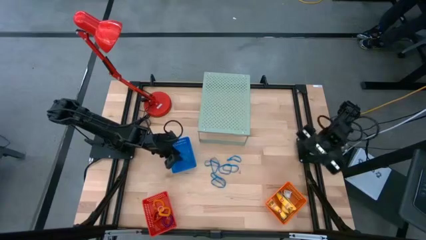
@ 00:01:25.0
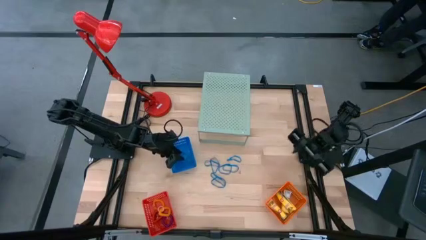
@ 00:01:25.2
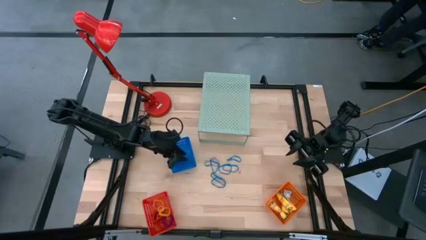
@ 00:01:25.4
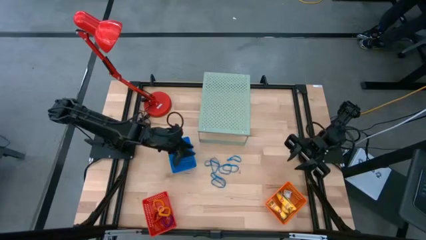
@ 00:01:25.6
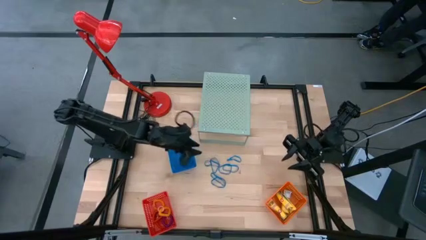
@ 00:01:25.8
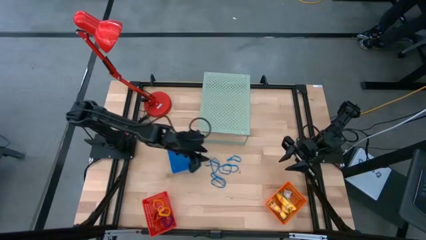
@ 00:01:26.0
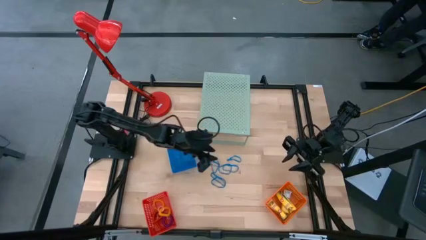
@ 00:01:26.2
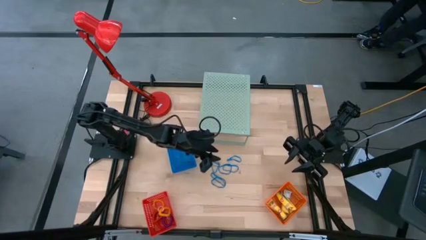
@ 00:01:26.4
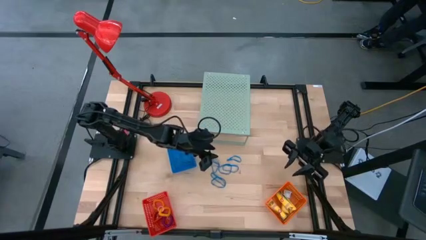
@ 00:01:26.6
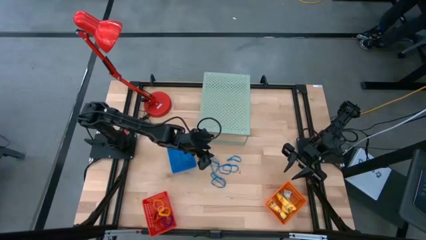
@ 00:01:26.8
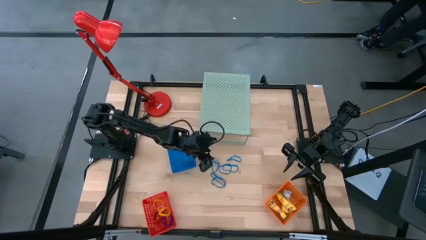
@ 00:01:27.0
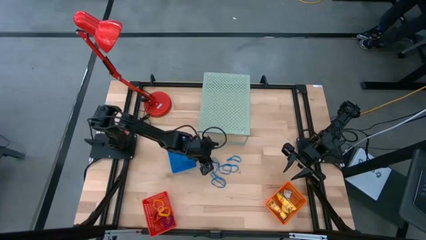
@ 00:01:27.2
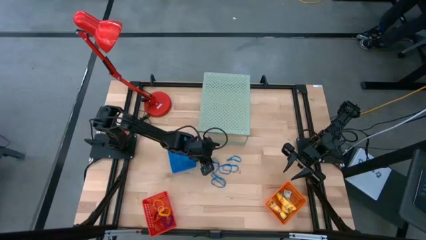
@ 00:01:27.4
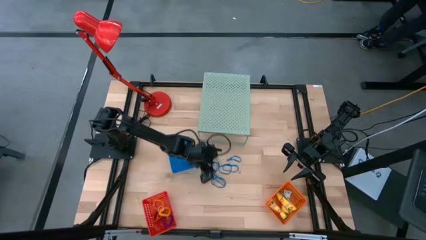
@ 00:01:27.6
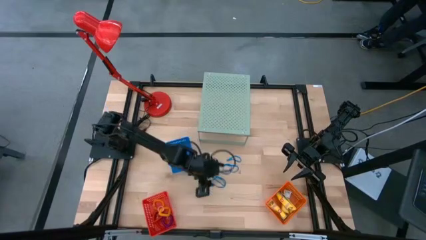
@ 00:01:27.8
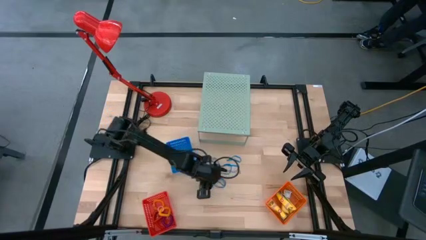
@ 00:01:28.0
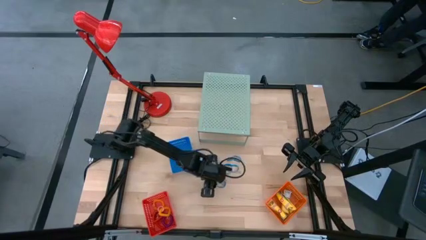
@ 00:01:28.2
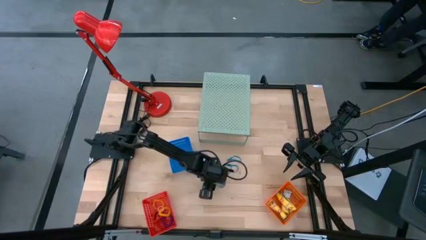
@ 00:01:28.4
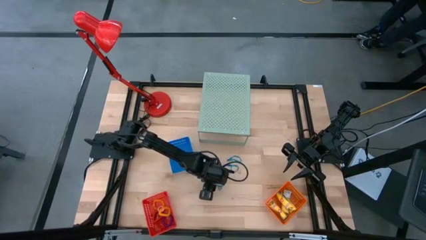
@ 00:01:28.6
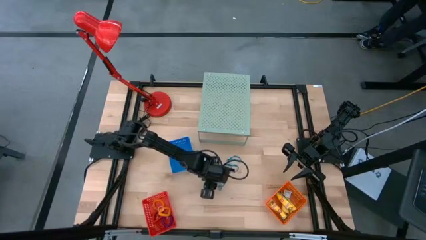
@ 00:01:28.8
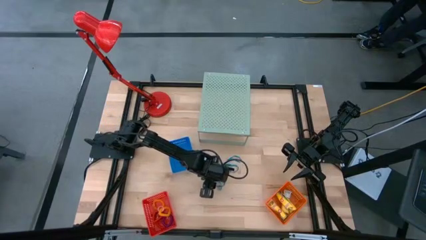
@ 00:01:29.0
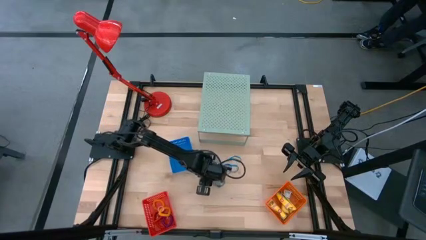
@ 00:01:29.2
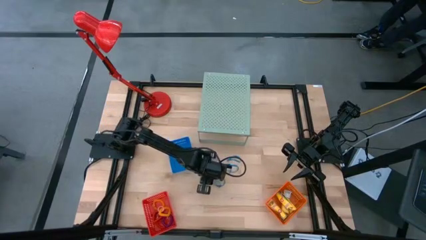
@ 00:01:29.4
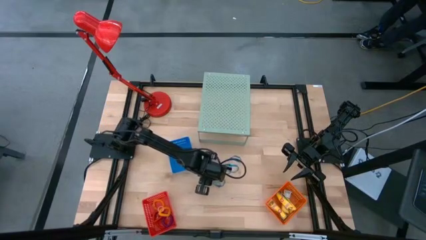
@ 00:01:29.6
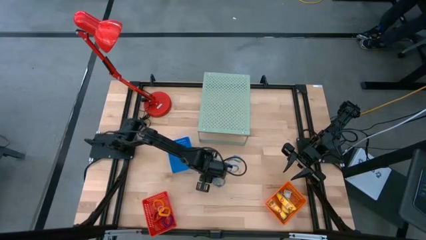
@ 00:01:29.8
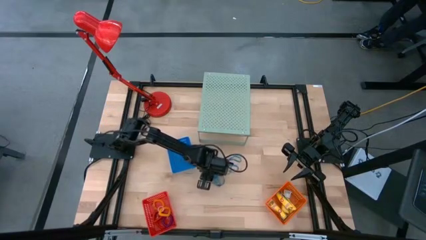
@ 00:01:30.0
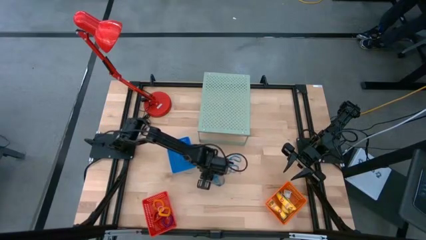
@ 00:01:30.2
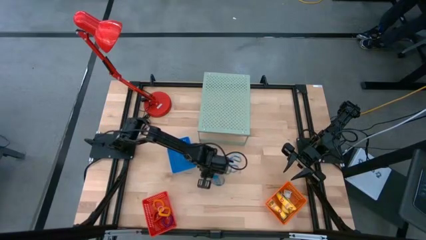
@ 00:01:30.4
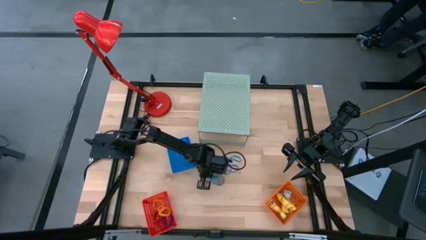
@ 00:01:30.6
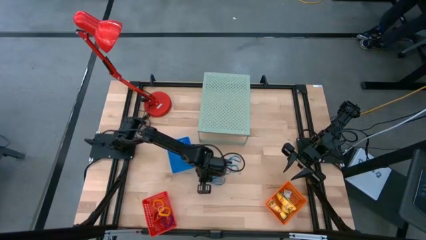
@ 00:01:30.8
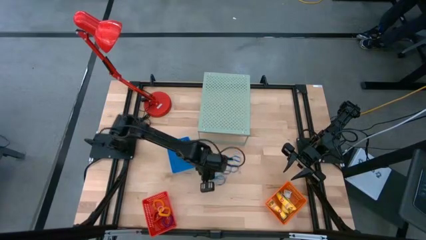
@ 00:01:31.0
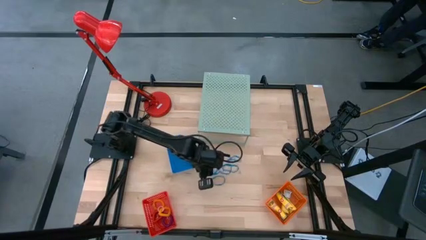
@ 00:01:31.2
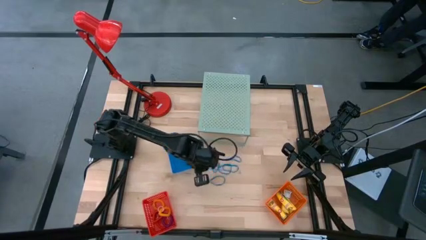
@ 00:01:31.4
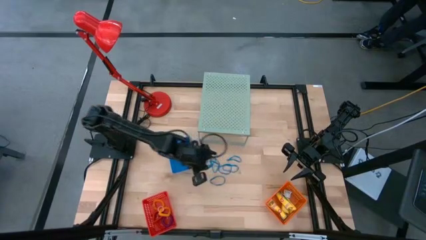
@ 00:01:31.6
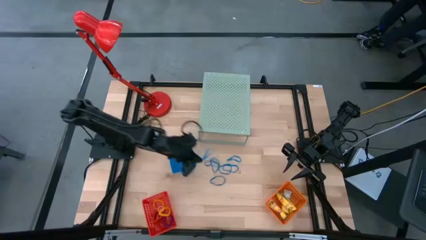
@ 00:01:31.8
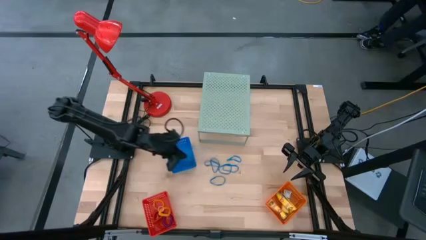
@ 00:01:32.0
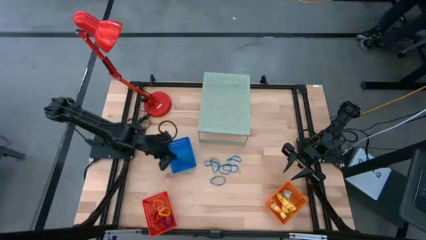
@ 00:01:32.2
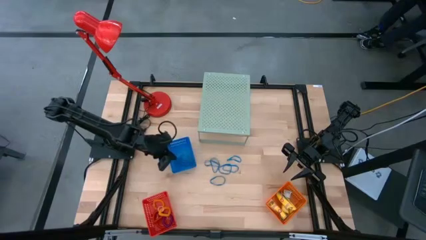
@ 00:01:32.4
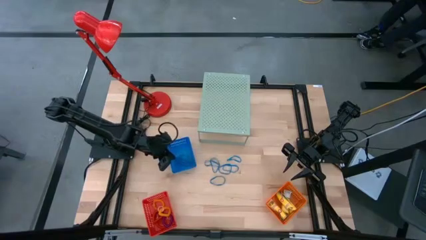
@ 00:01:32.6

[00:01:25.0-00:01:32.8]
Task: Pick & Place Office Desk Supplies
Put the blue rubber band into the blue basket

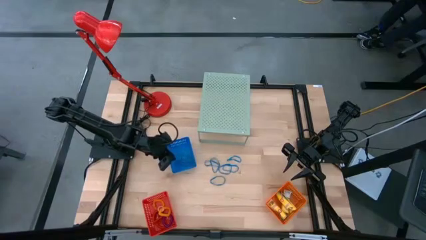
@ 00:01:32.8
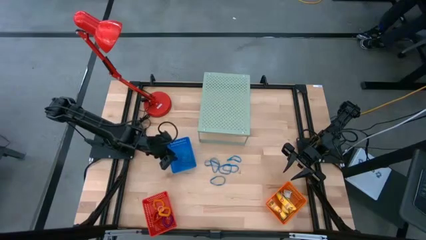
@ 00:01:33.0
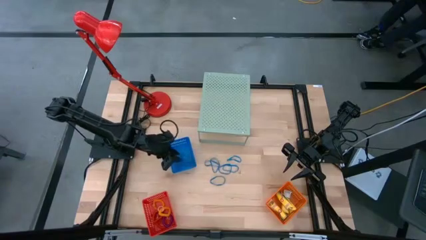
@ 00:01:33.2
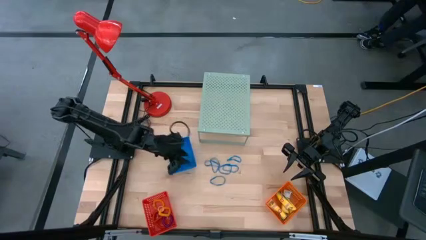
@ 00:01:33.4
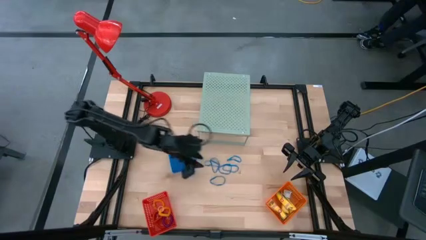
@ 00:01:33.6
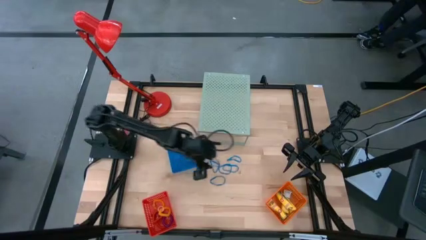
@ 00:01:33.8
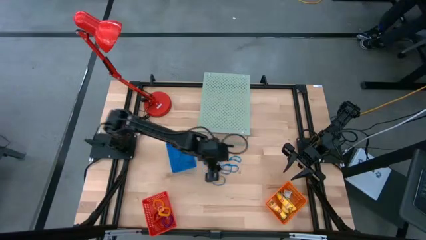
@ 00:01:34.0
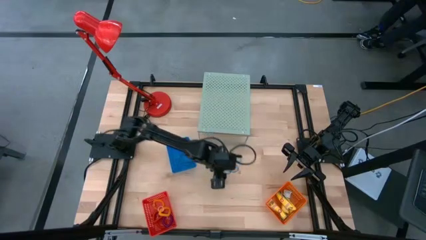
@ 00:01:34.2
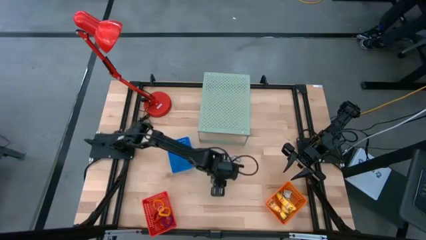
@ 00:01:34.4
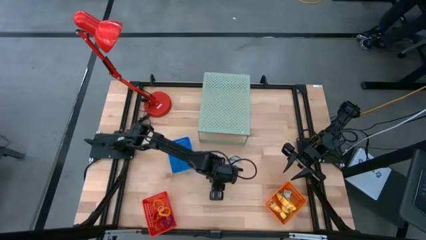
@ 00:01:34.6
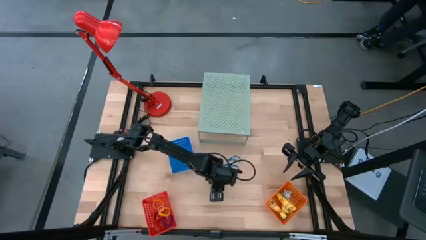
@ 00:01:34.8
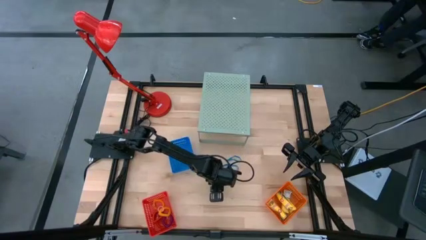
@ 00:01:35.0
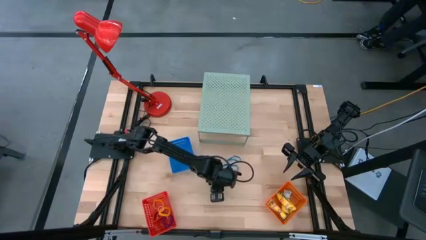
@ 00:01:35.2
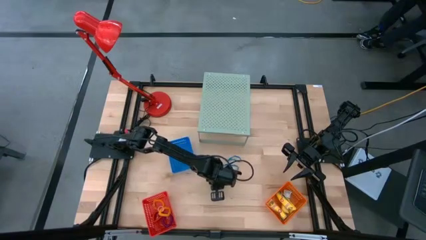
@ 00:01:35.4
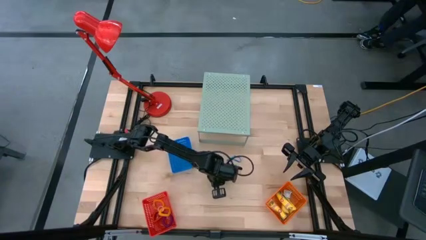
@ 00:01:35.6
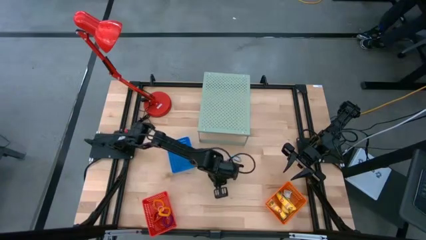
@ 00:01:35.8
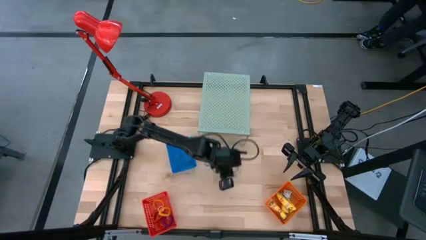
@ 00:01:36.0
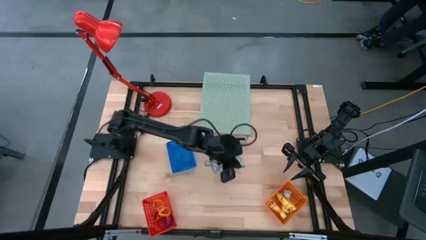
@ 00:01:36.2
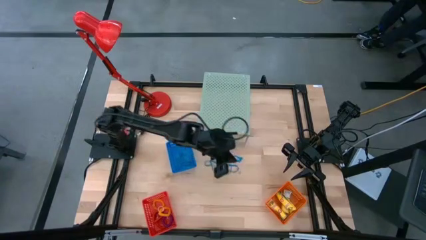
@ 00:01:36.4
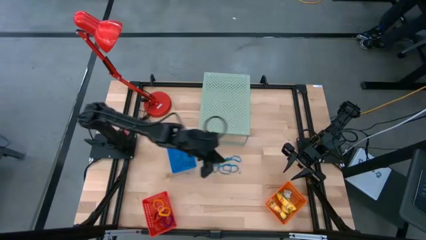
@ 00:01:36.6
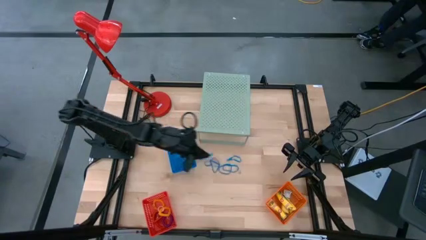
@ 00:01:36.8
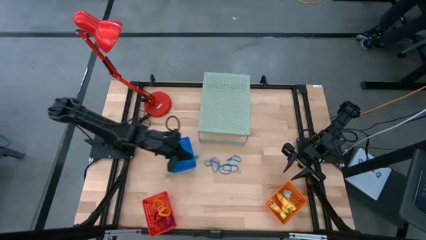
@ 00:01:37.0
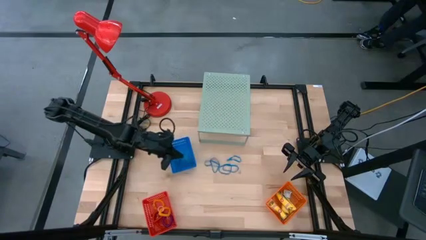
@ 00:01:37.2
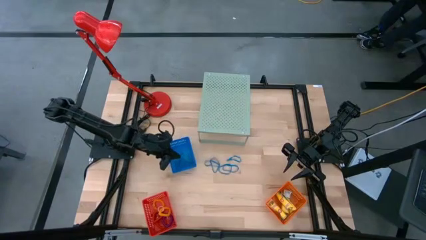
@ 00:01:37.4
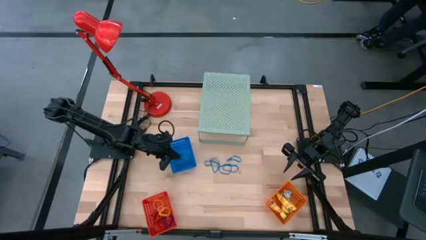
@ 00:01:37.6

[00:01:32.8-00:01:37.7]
Put the blue rubber band into the blue basket

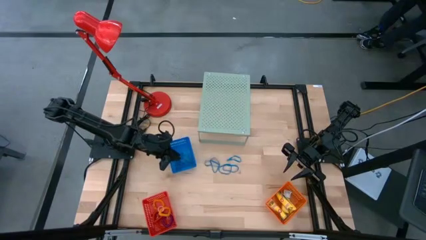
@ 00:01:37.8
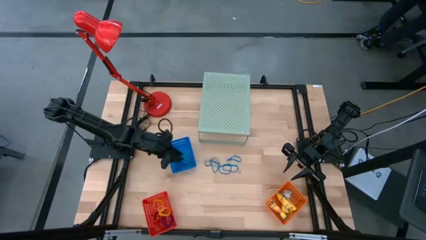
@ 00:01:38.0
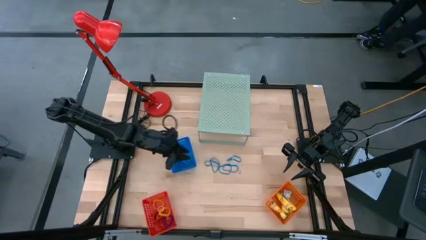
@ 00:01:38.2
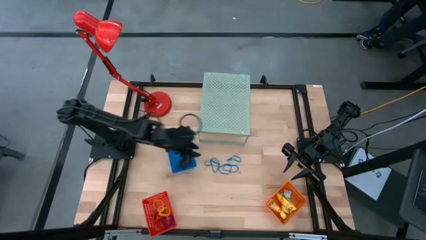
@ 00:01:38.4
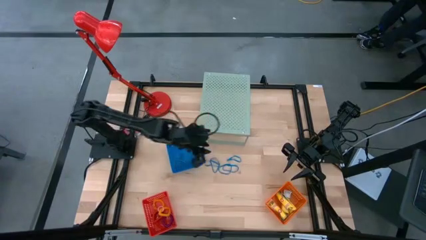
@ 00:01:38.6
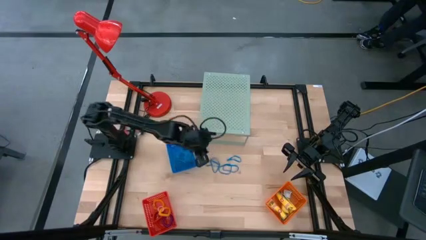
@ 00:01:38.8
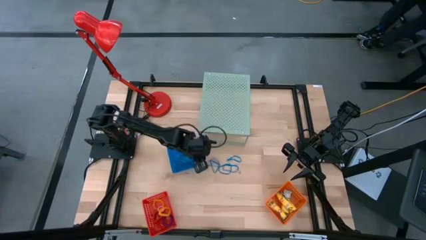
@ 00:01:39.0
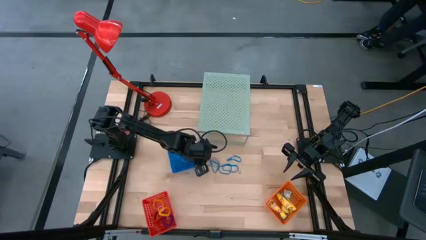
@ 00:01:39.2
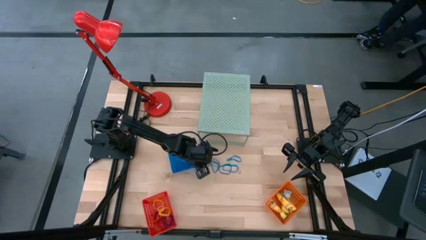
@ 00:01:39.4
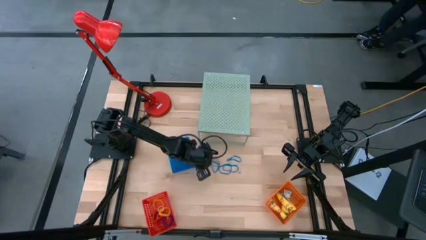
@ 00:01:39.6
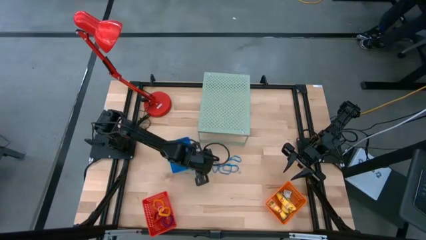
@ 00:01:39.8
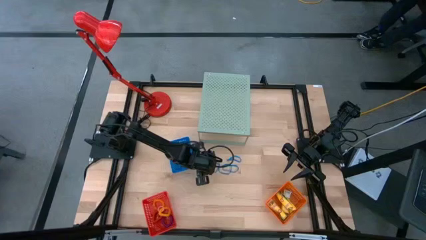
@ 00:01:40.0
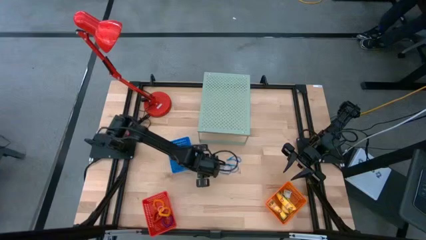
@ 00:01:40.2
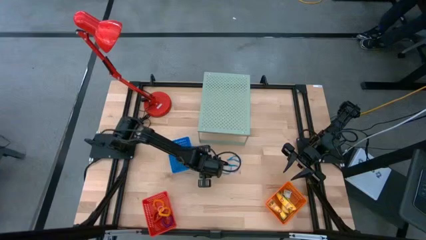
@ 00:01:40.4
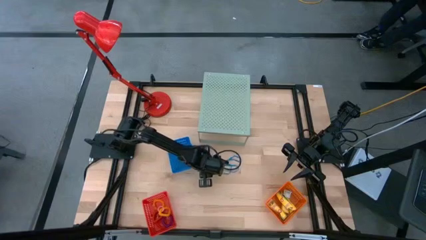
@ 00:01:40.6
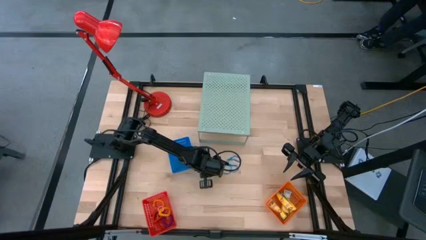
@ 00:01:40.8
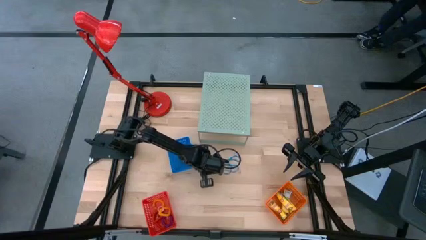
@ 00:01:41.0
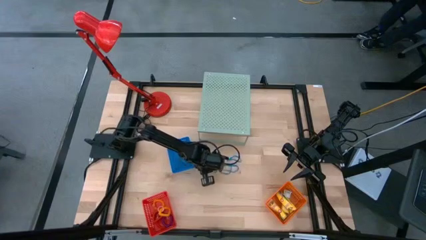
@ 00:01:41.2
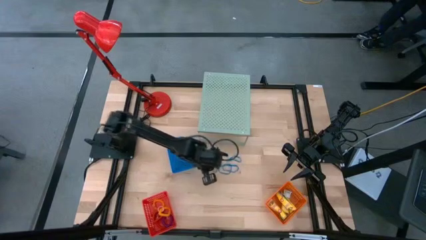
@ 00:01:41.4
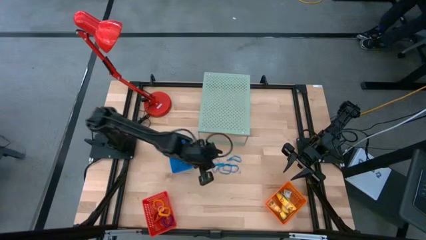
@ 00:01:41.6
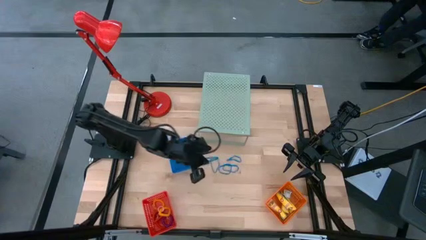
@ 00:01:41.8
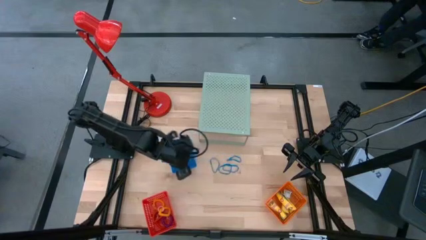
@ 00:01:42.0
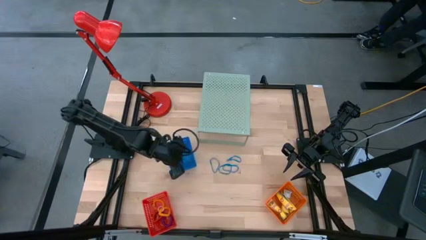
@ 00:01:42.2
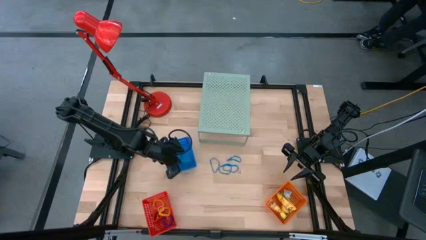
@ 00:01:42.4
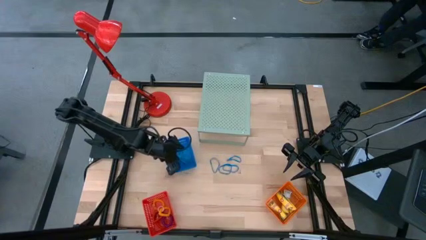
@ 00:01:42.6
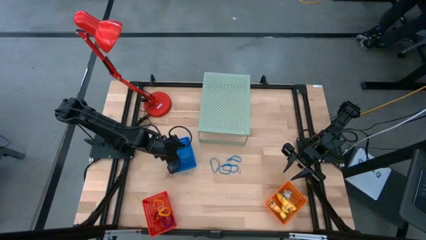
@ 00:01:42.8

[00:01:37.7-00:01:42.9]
Put the blue rubber band into the blue basket
